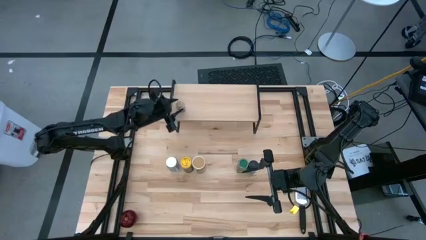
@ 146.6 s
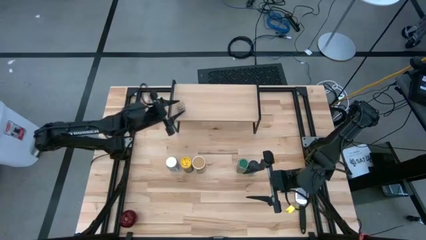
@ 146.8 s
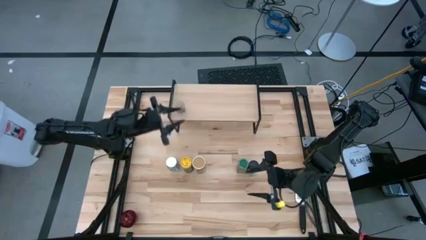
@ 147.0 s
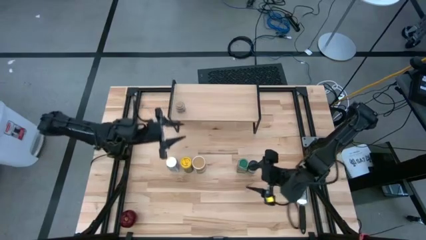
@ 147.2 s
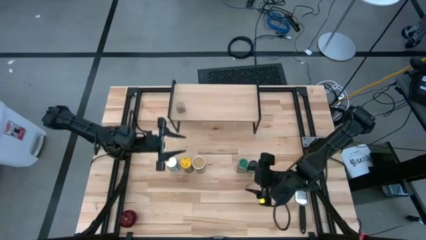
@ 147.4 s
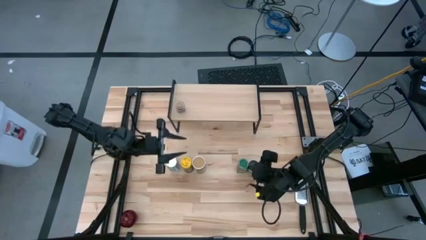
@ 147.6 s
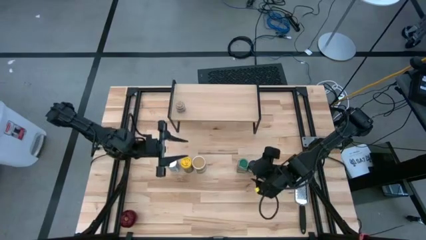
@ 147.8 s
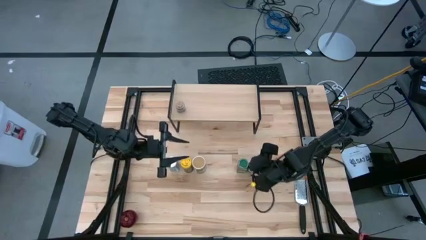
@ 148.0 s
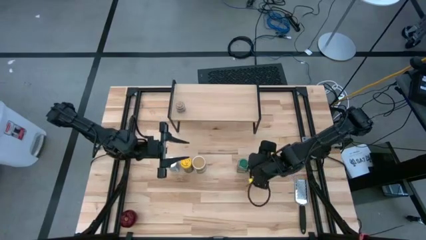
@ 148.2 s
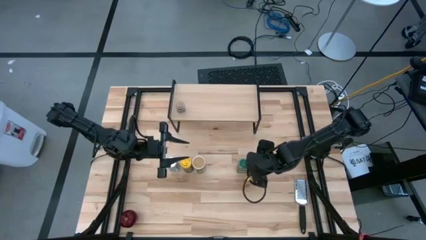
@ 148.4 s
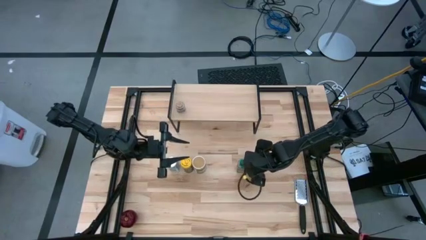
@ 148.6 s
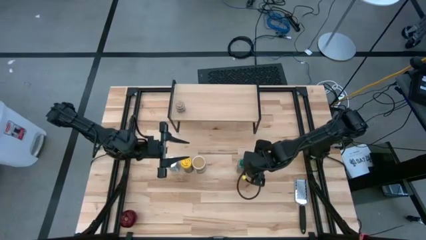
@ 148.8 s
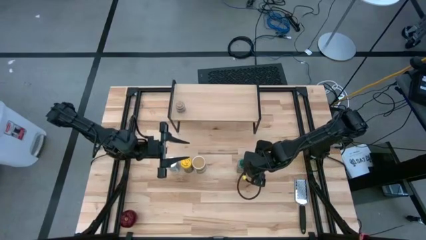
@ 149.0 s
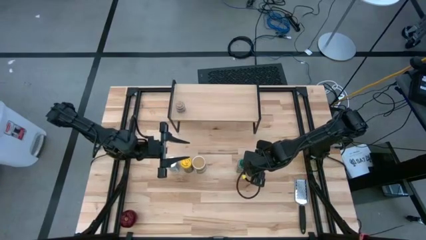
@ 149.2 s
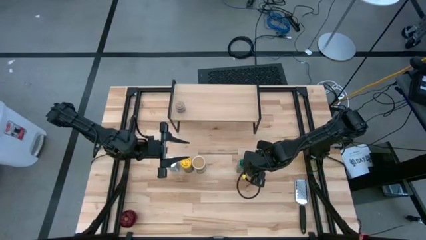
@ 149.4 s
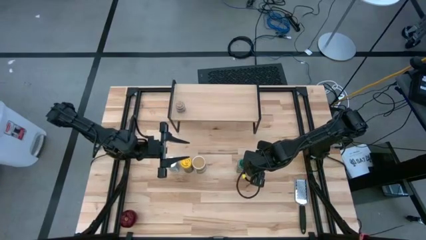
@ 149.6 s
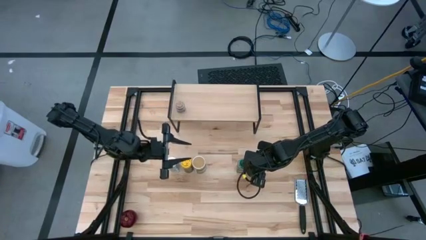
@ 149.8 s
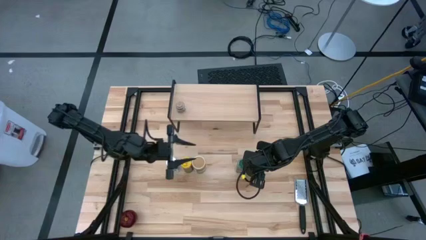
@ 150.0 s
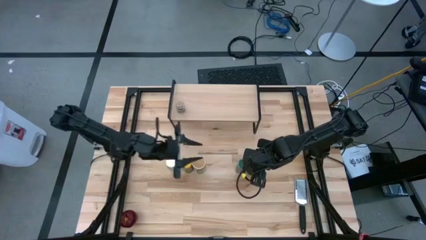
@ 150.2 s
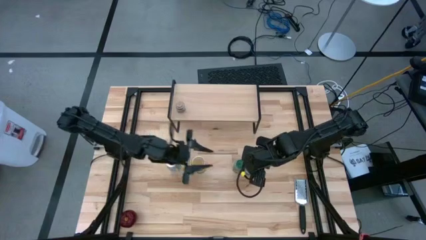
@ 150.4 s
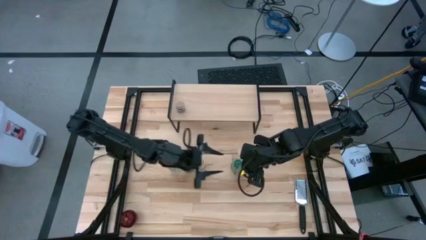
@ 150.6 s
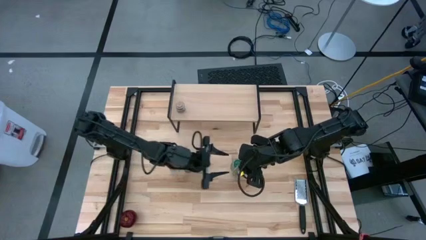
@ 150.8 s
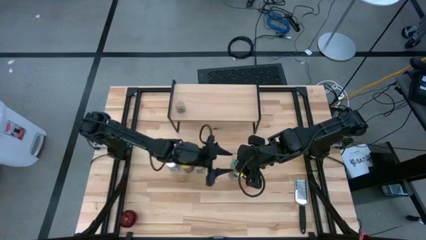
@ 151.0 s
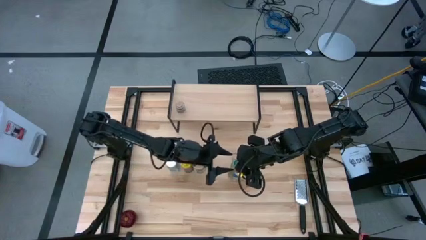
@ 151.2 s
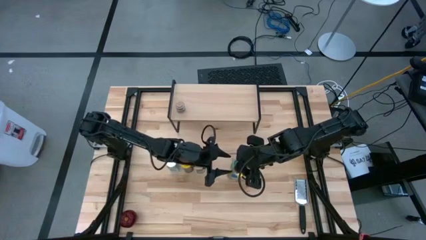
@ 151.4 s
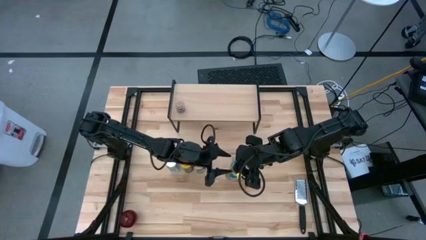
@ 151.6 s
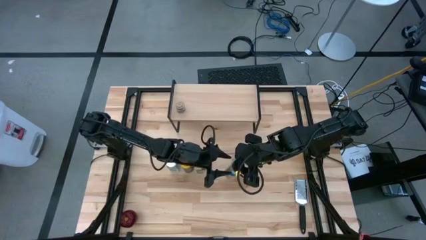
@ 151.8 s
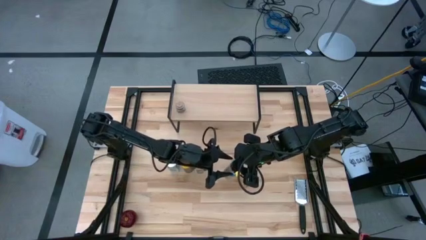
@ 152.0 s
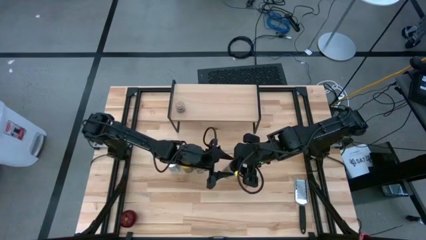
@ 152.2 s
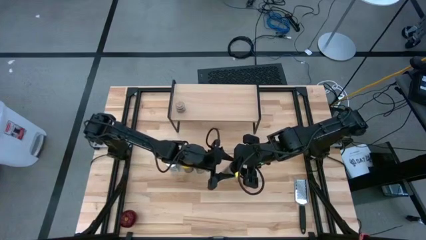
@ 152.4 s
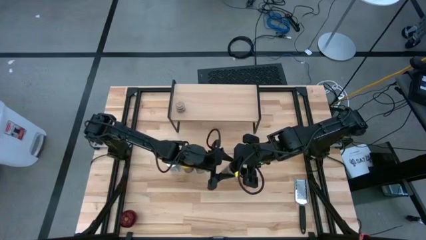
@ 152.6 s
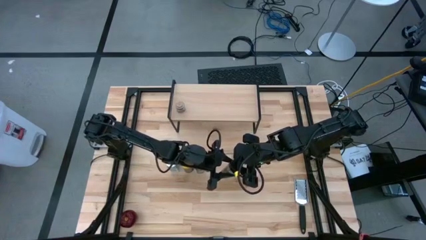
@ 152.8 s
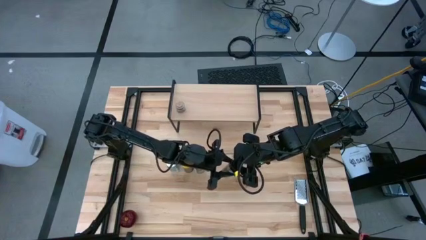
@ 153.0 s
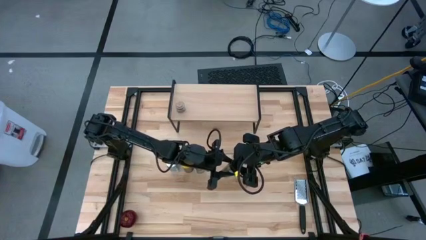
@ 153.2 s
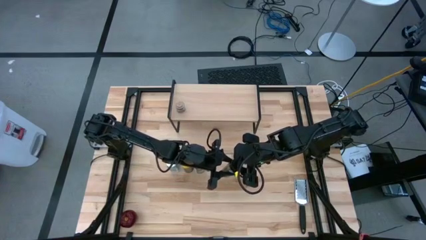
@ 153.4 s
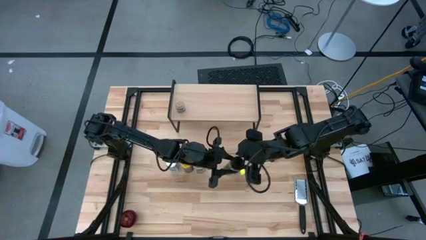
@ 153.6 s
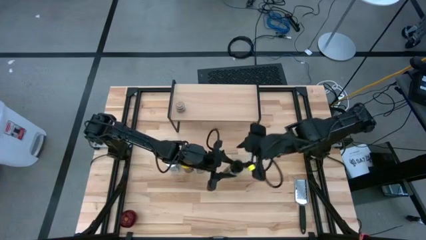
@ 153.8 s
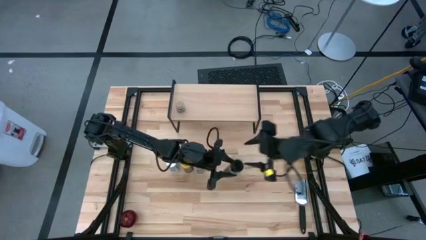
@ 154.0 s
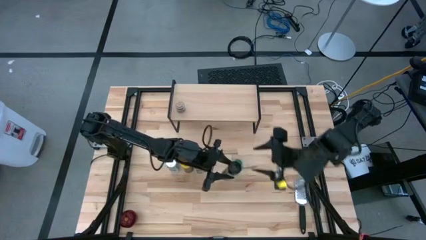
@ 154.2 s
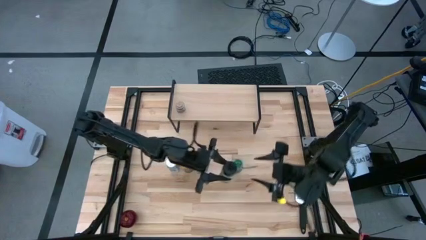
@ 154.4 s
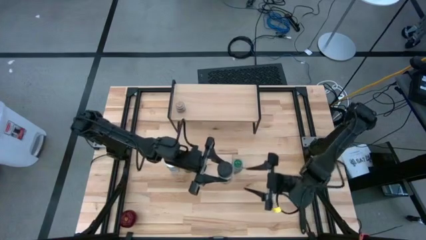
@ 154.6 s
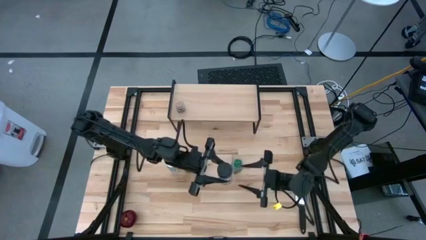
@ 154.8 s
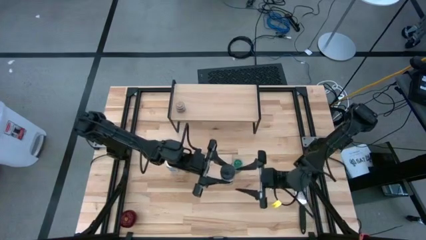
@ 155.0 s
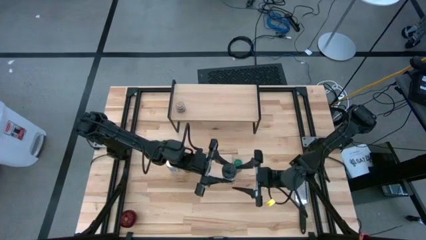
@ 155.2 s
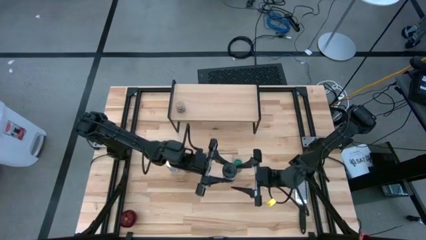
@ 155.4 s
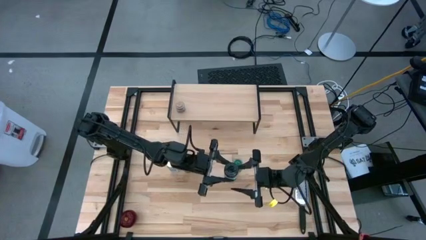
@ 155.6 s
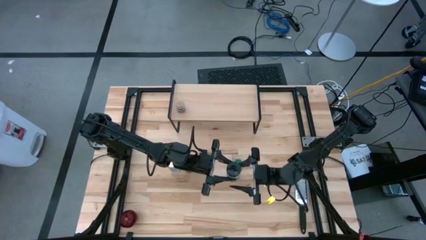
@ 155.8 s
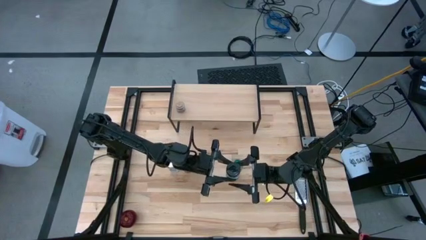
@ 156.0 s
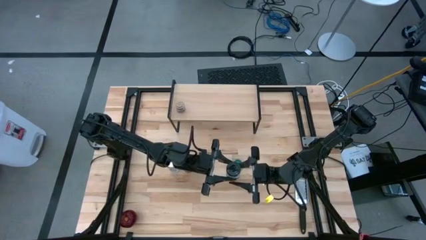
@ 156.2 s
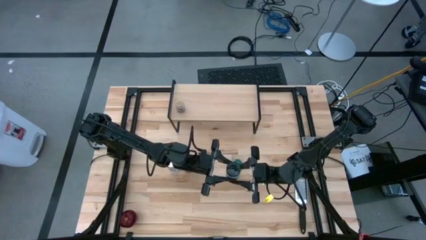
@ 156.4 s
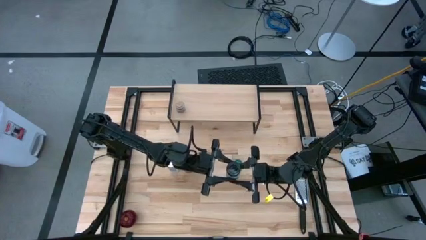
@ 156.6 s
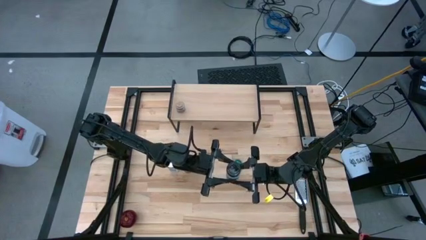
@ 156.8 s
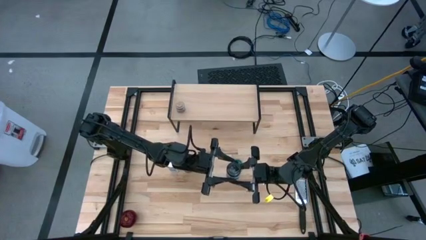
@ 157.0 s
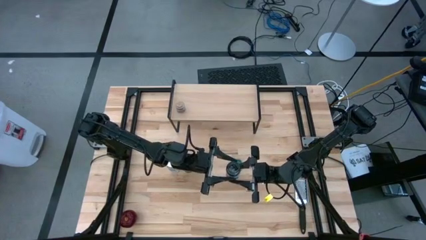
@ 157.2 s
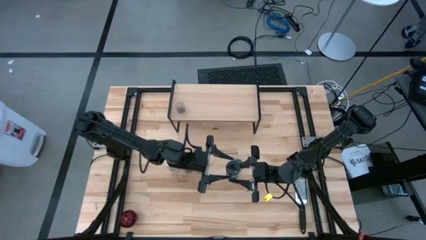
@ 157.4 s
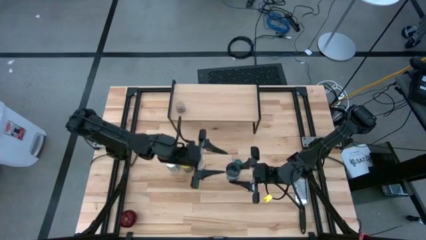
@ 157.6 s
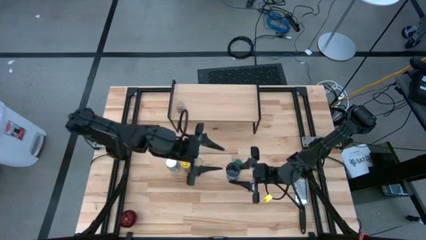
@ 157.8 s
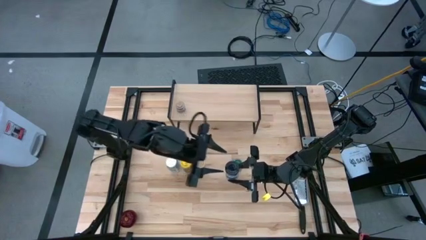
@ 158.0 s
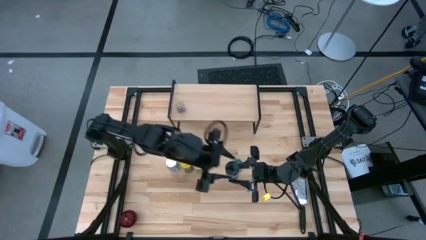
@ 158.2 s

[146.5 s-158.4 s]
Task: Shelf spices
Put the black seasoning bottle on the shelf
